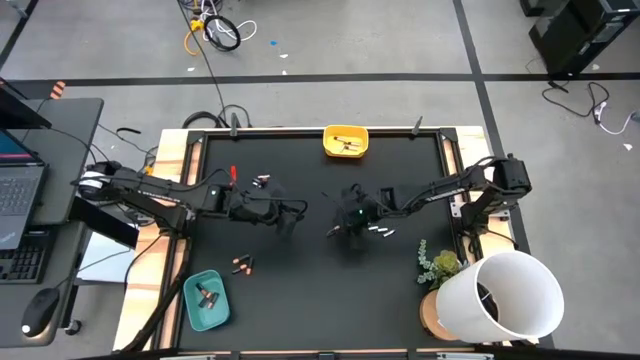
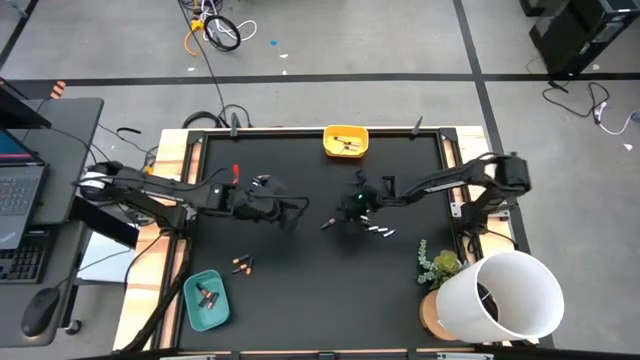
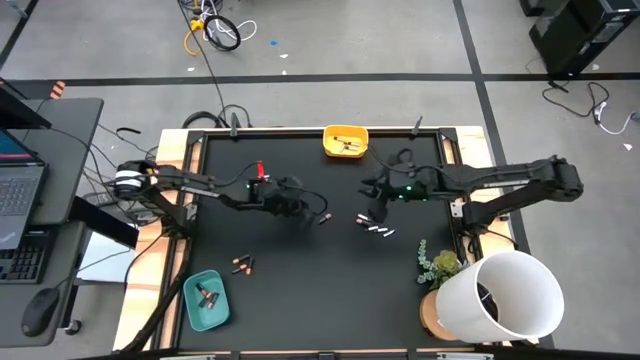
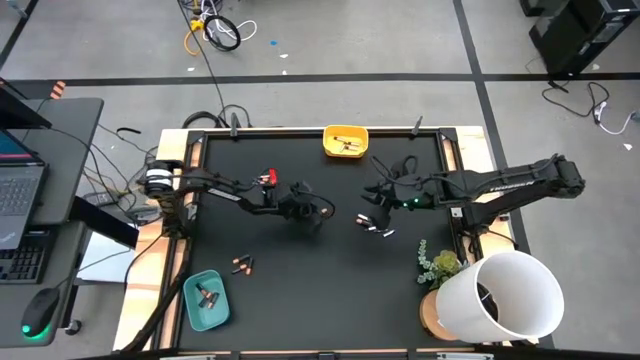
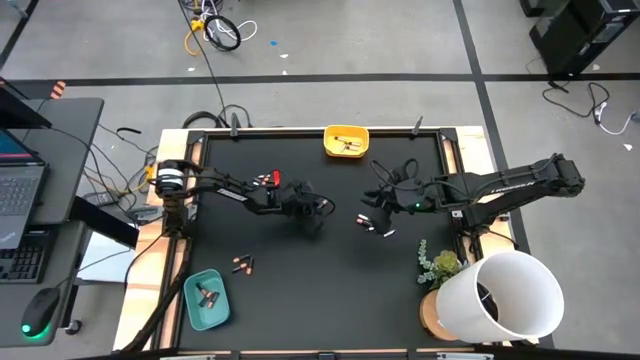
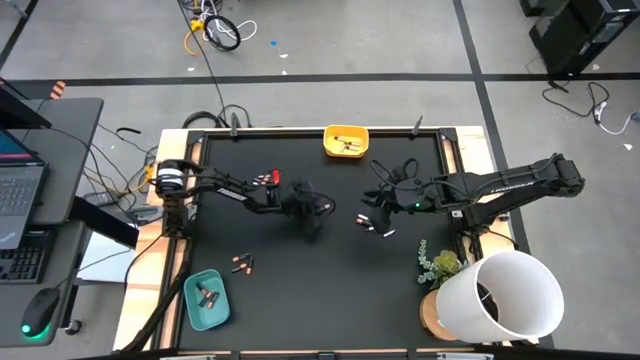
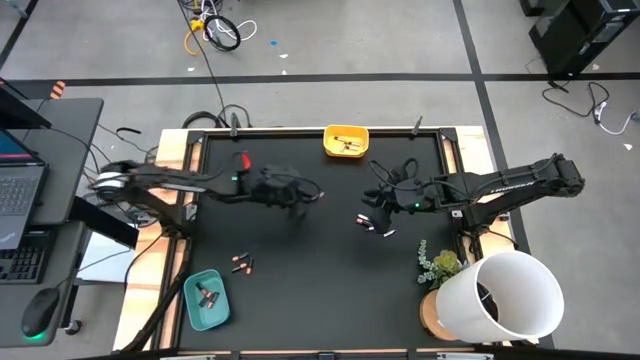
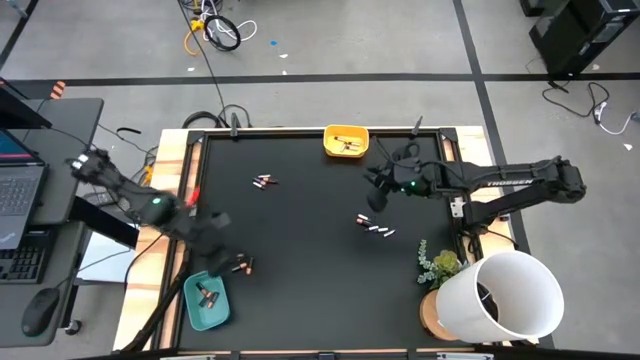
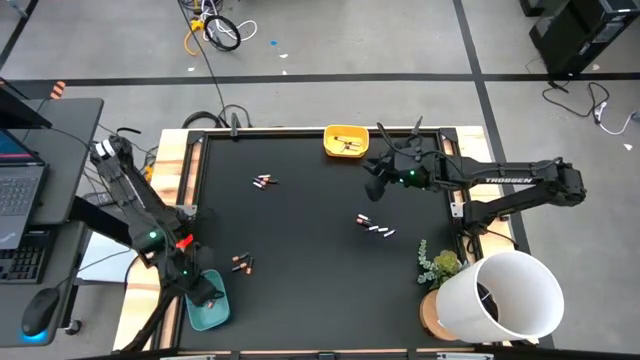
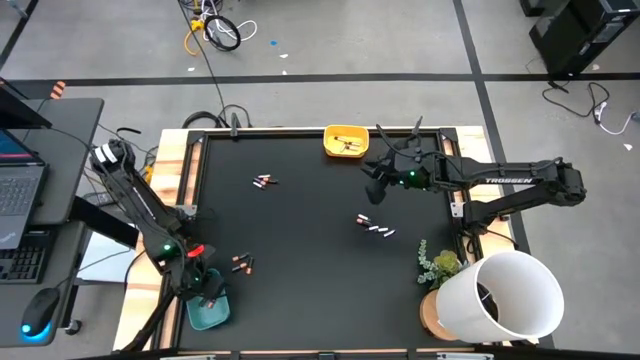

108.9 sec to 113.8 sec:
Task: Sort batteries
Put the black battery into the green bin

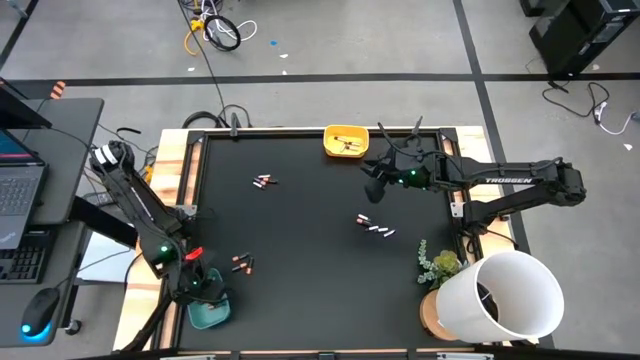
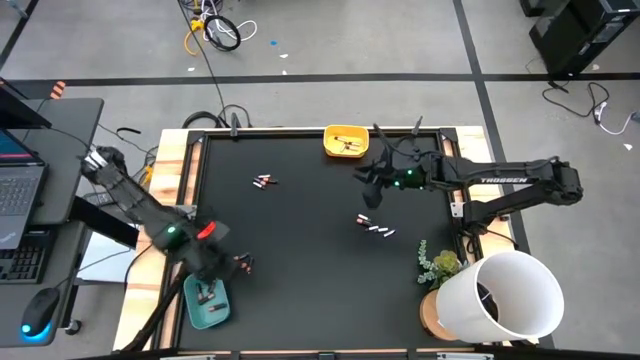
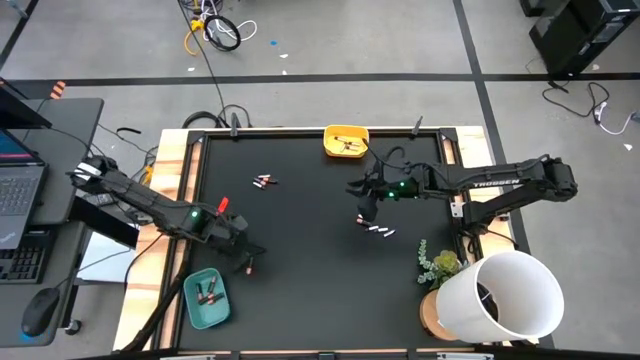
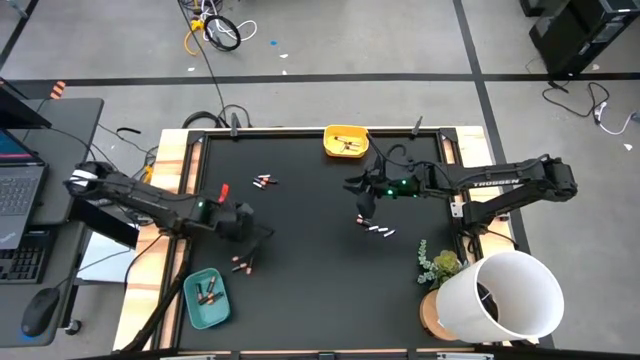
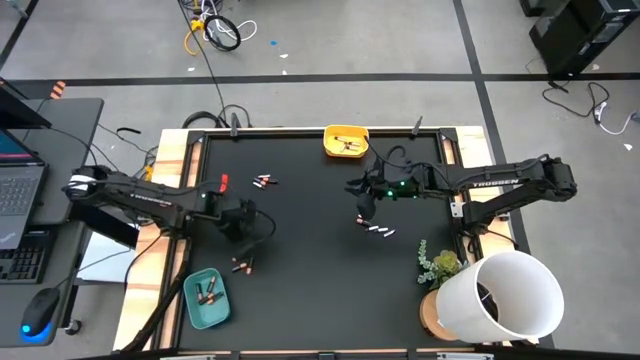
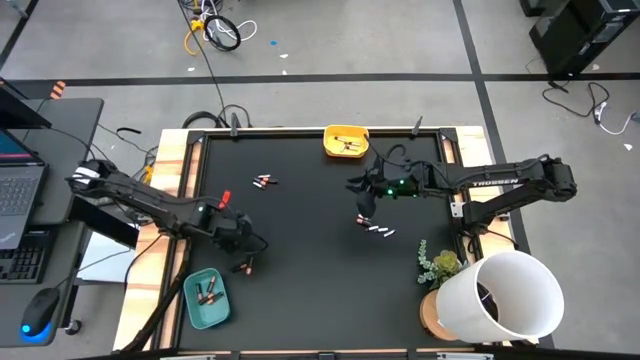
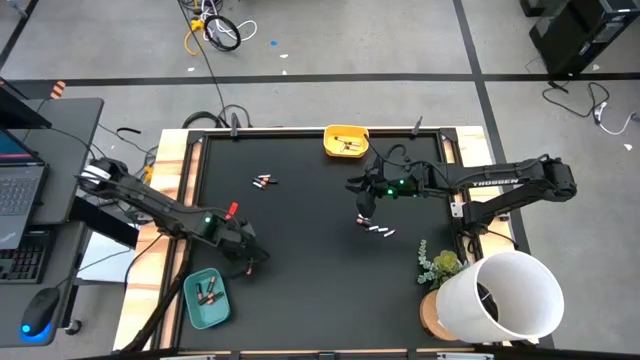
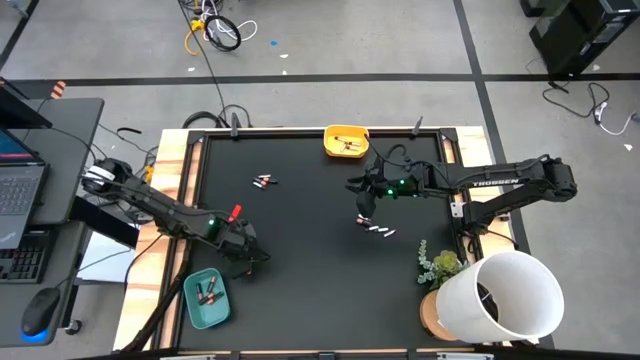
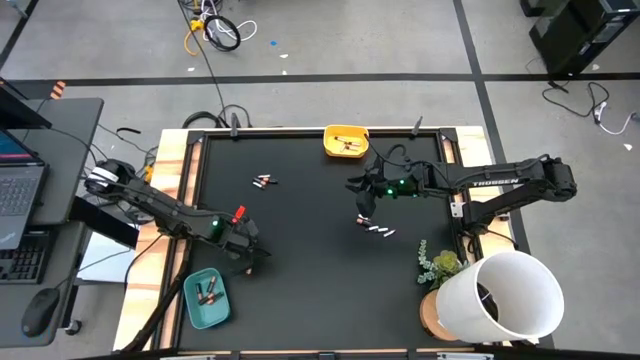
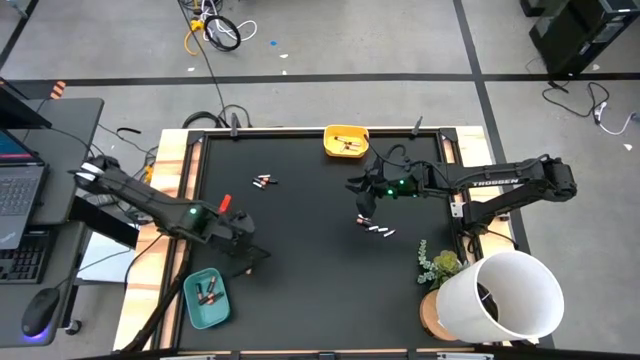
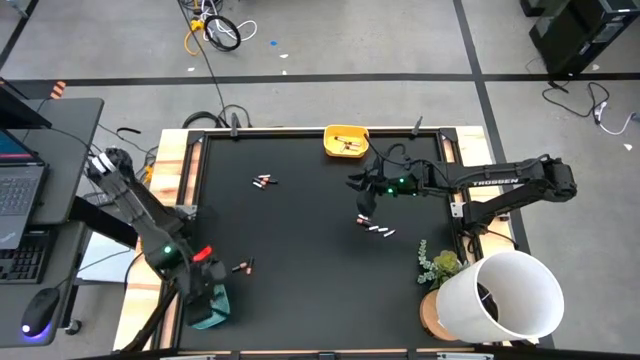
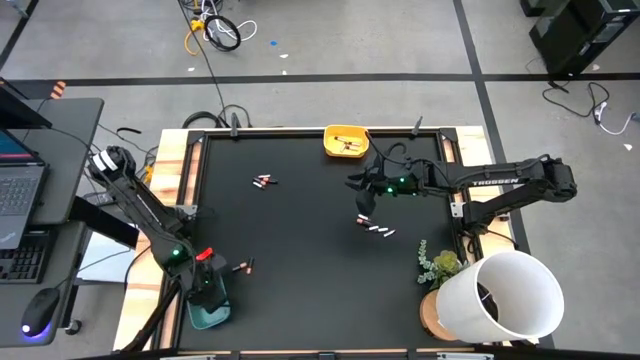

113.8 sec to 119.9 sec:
Put the black battery into the green bin

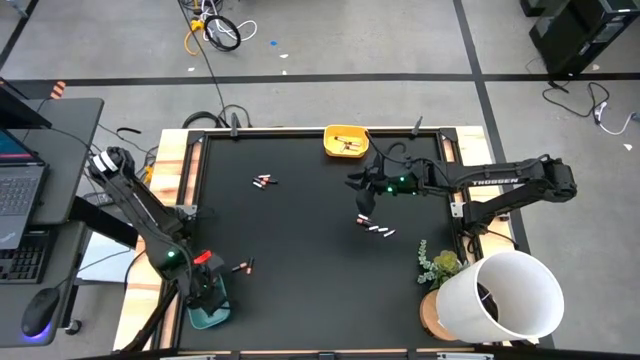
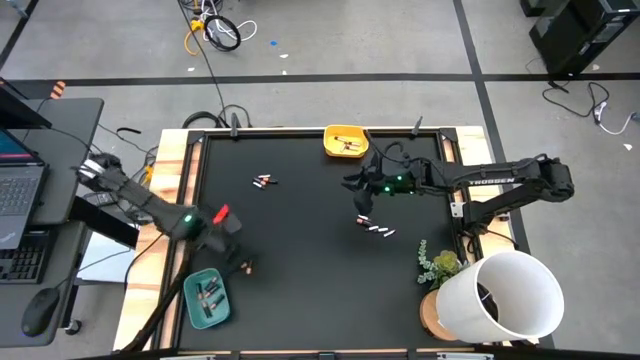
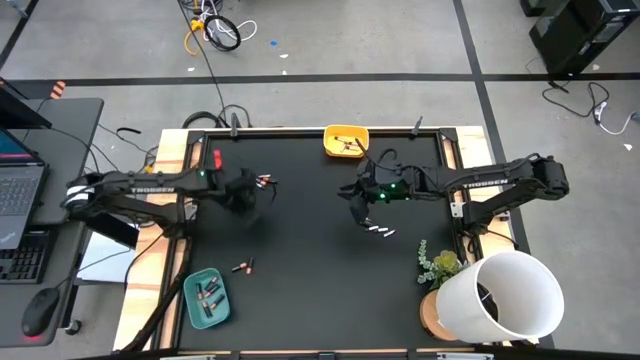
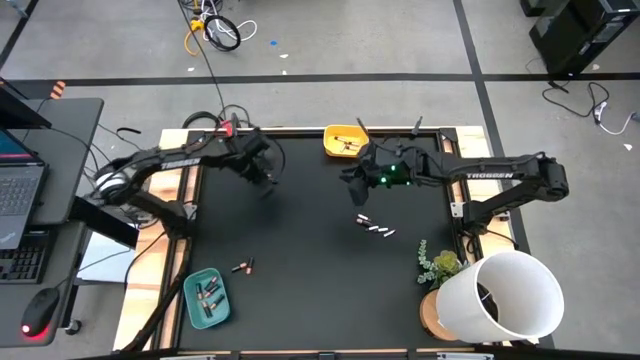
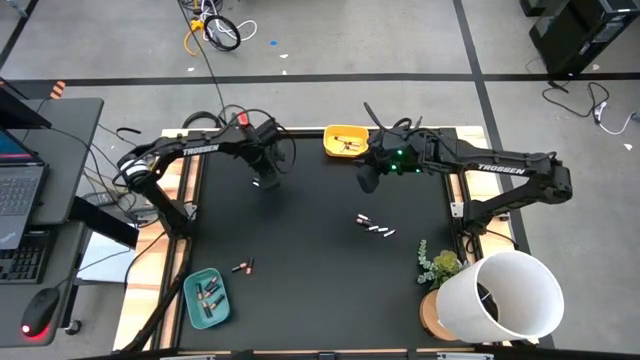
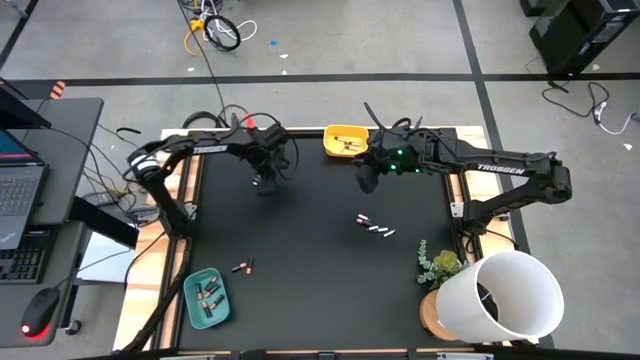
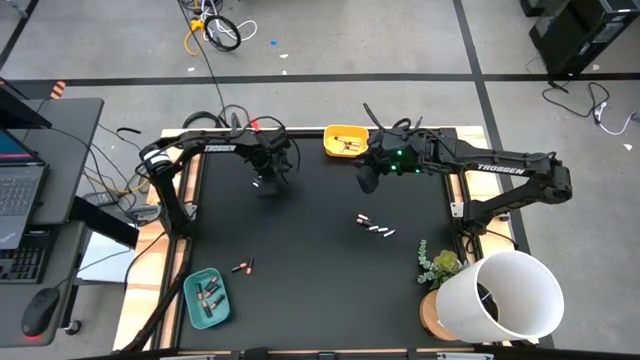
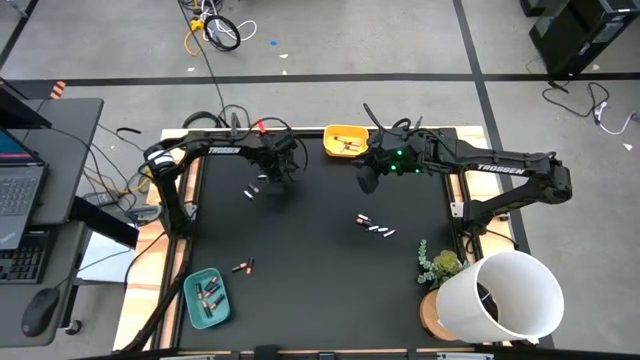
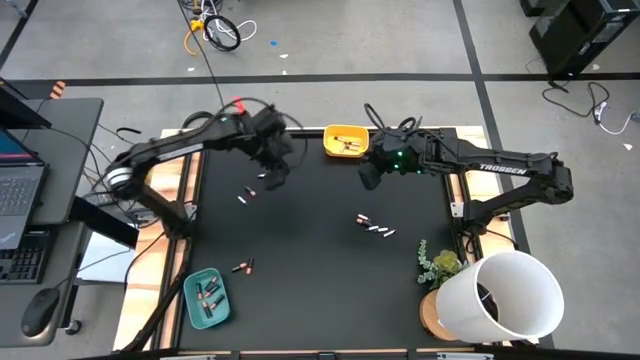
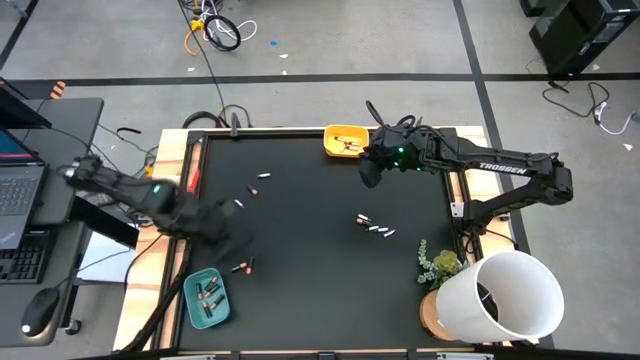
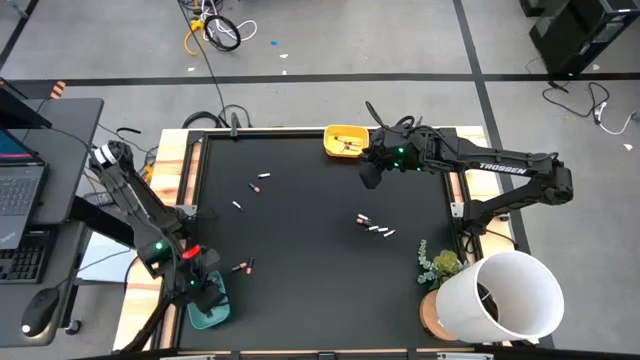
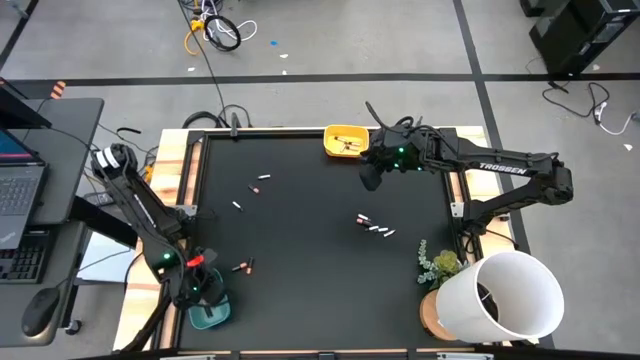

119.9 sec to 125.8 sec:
Put the black battery into the green bin

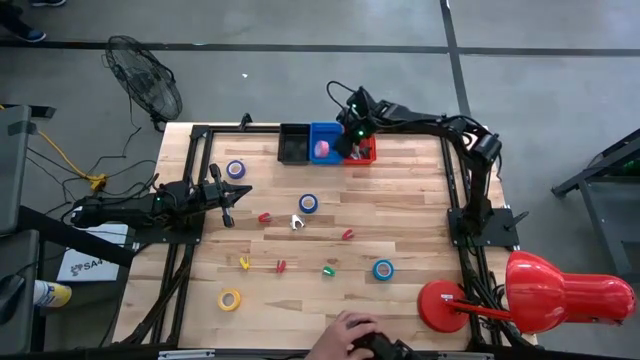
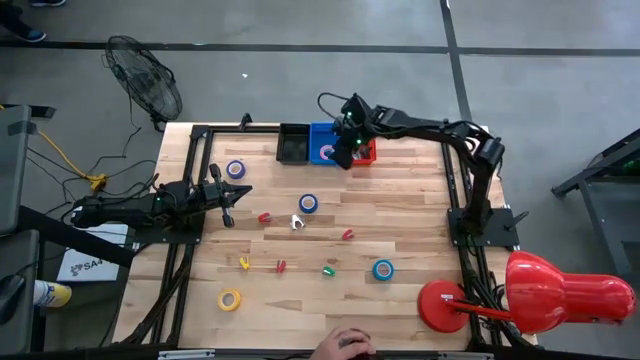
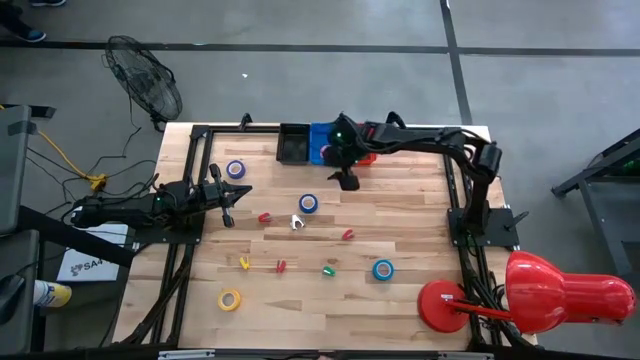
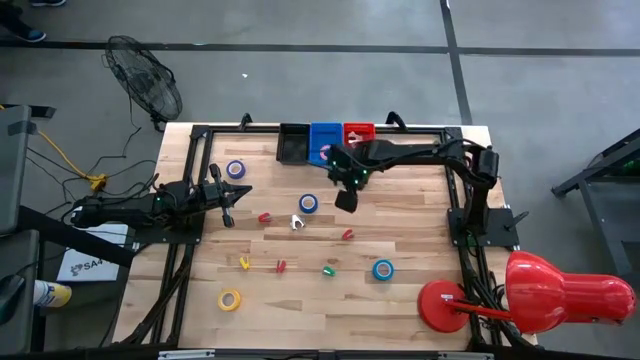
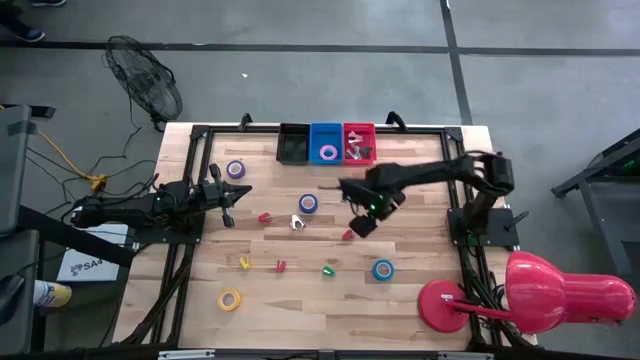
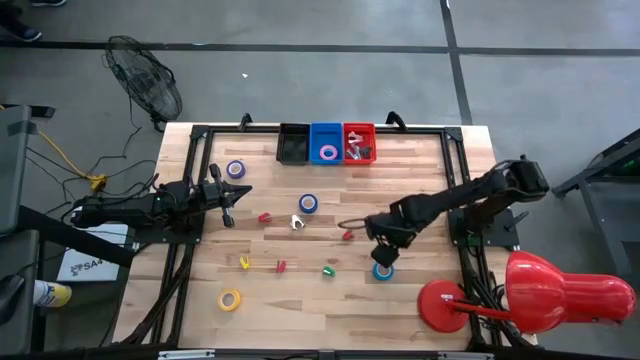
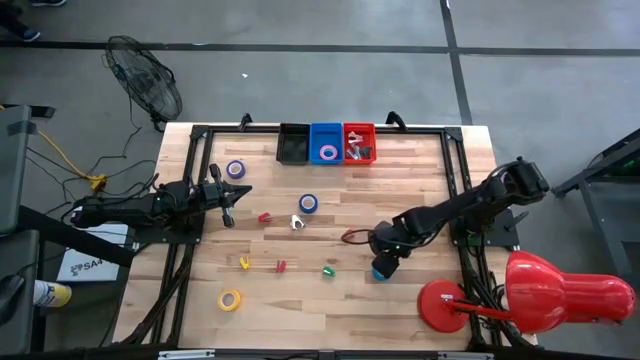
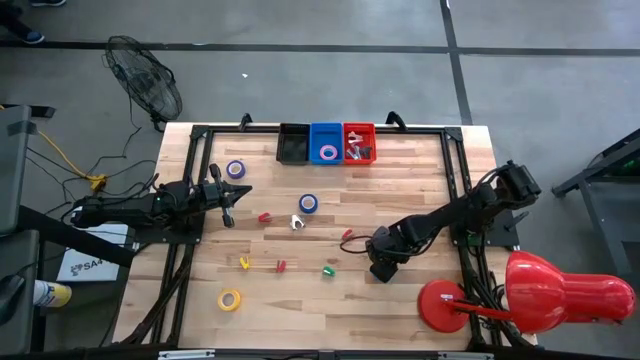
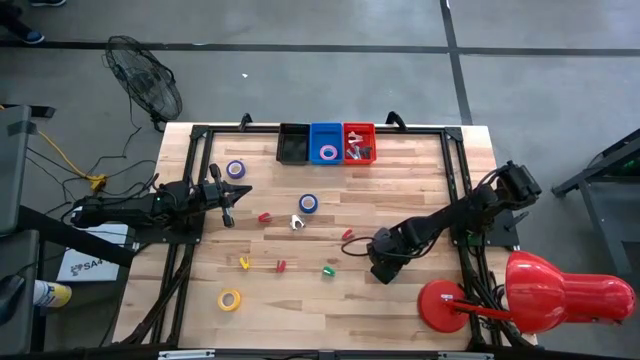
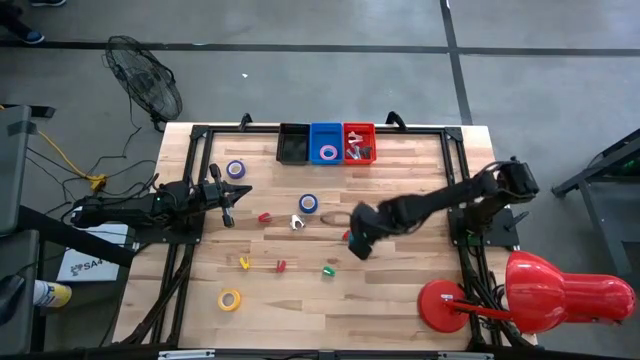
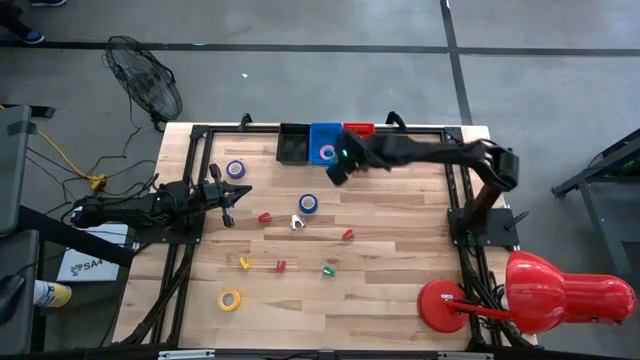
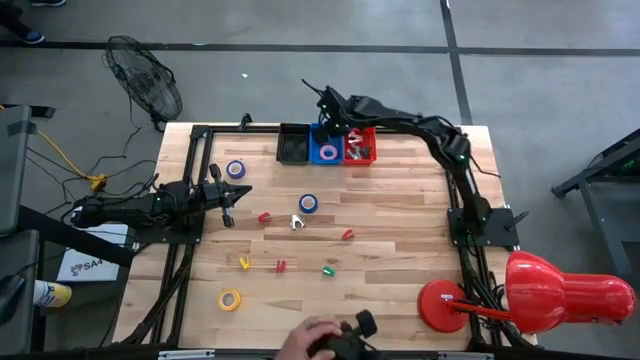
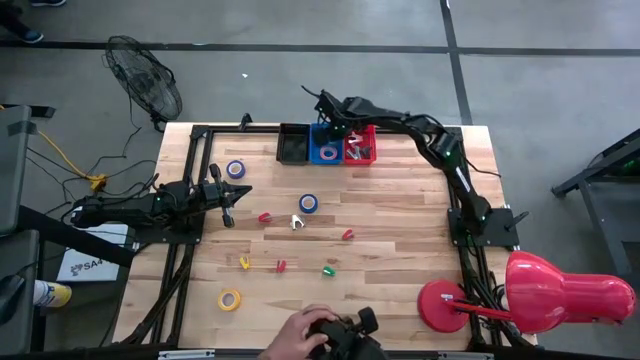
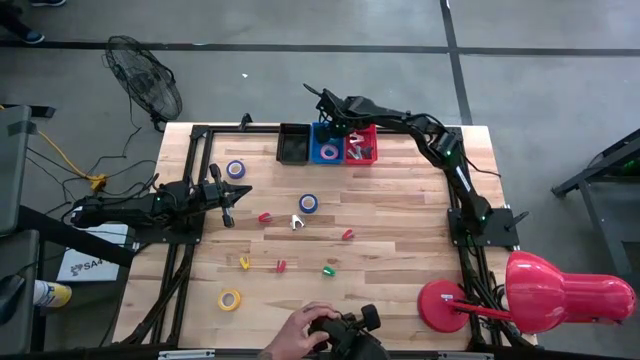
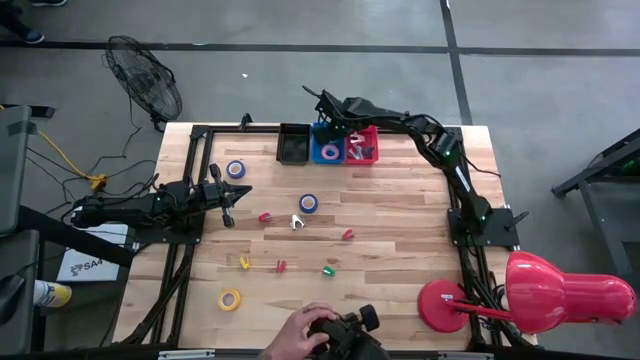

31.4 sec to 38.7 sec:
Task: Pick and place Stapler, Stapler remover, tape
Put the light blue tape into the blue bin
